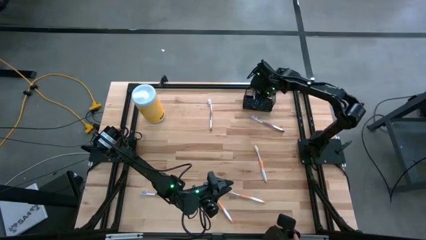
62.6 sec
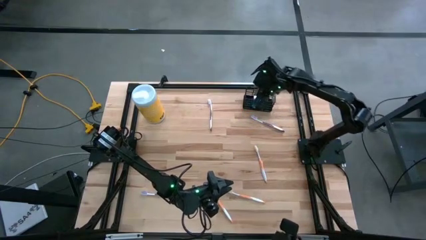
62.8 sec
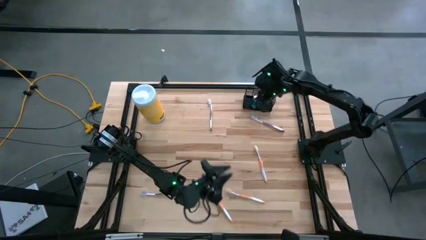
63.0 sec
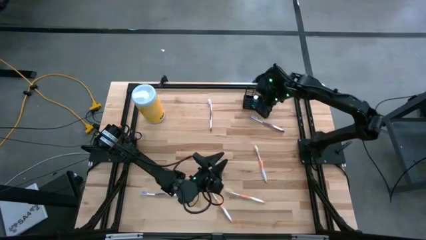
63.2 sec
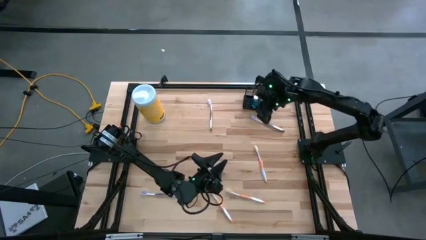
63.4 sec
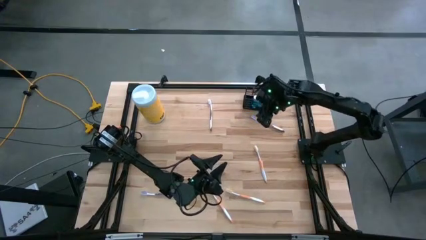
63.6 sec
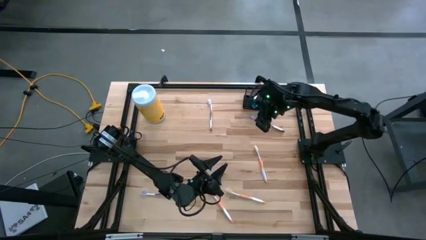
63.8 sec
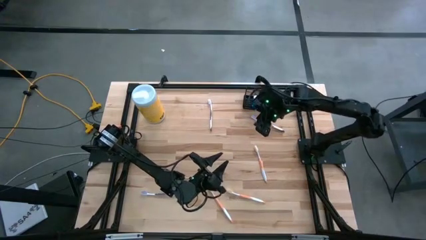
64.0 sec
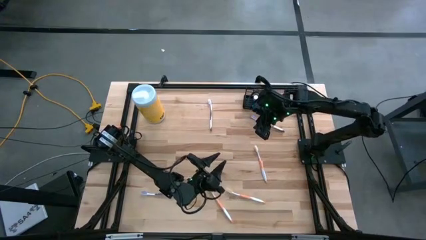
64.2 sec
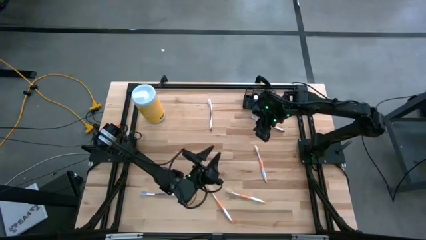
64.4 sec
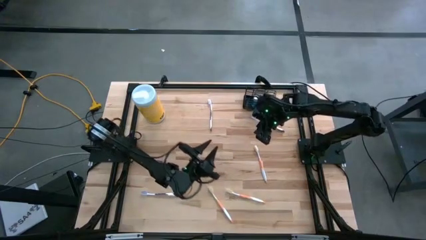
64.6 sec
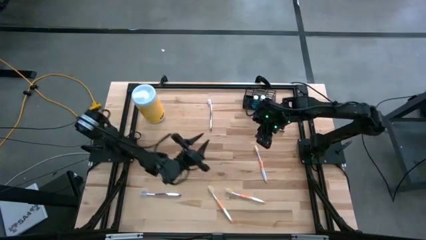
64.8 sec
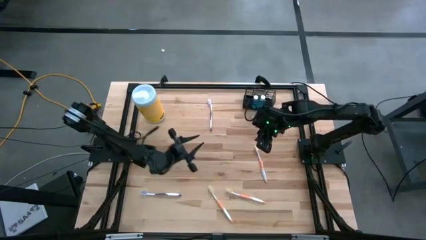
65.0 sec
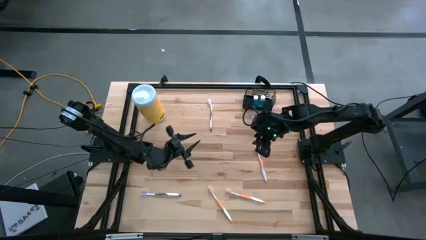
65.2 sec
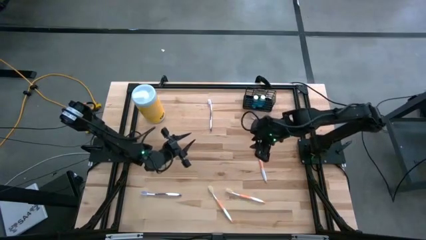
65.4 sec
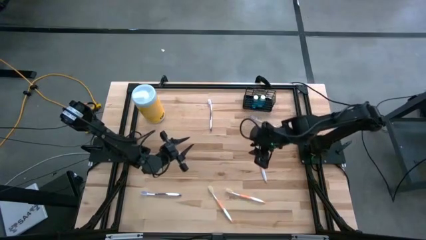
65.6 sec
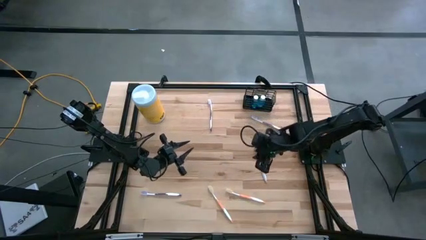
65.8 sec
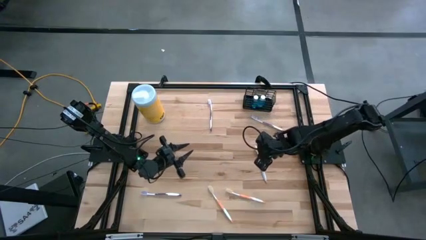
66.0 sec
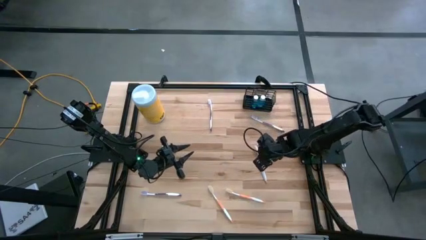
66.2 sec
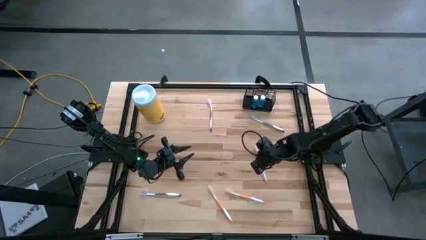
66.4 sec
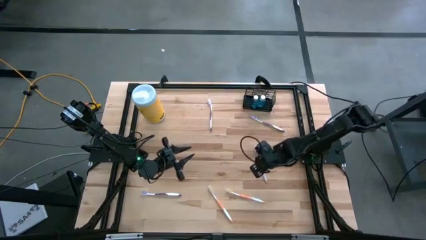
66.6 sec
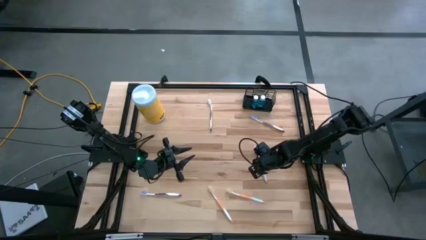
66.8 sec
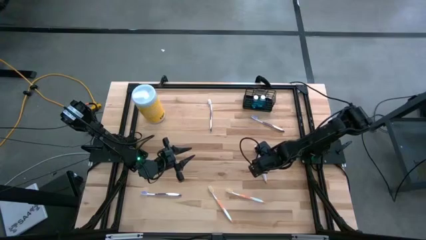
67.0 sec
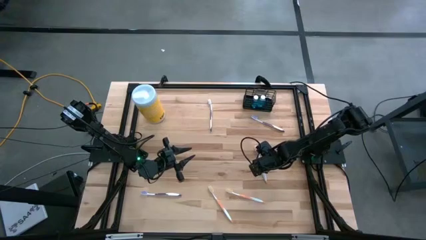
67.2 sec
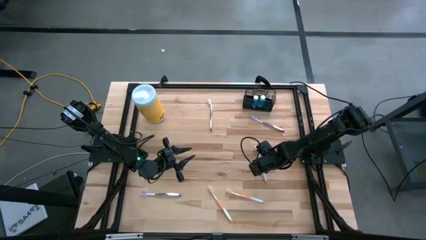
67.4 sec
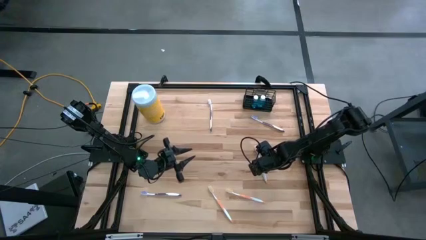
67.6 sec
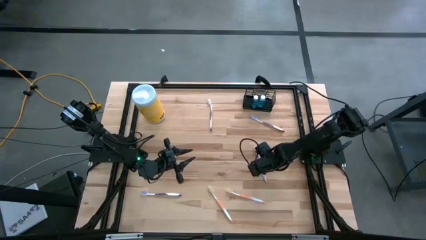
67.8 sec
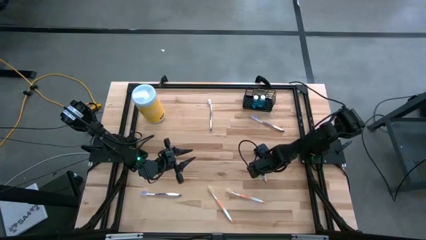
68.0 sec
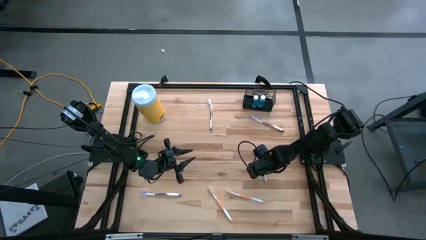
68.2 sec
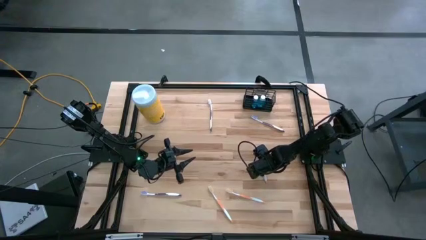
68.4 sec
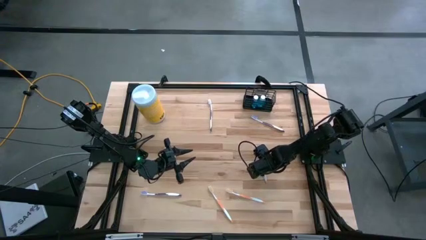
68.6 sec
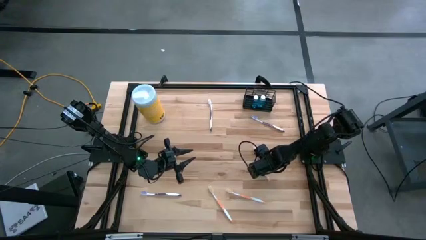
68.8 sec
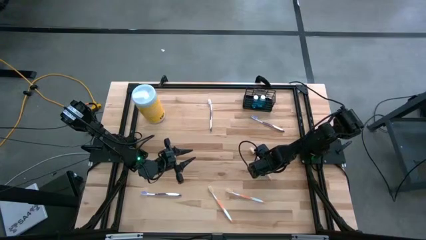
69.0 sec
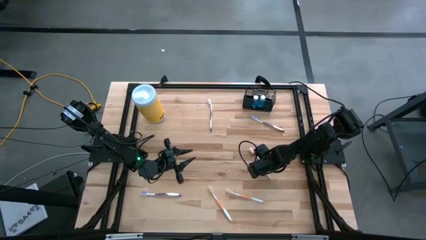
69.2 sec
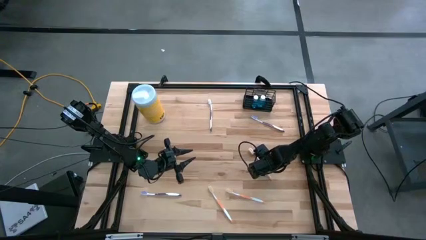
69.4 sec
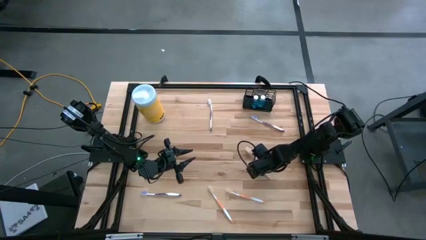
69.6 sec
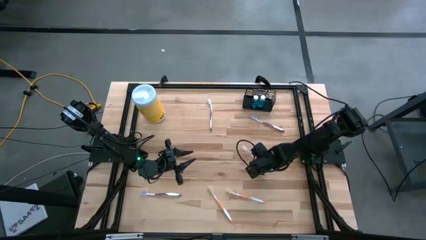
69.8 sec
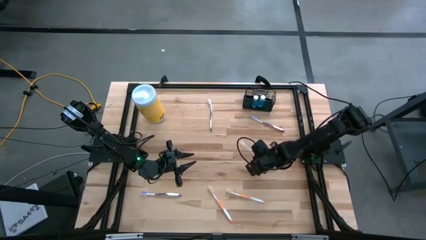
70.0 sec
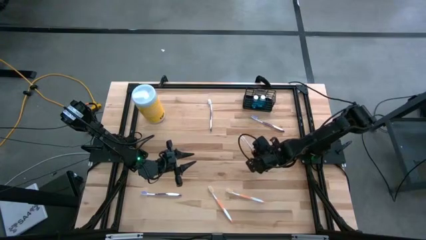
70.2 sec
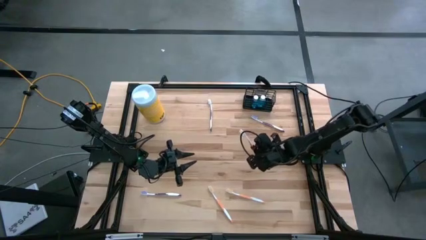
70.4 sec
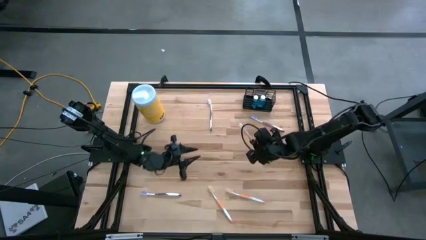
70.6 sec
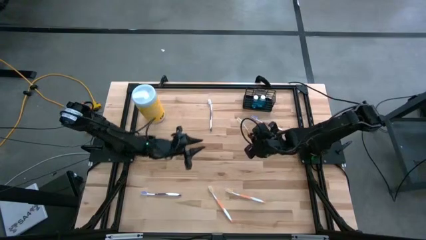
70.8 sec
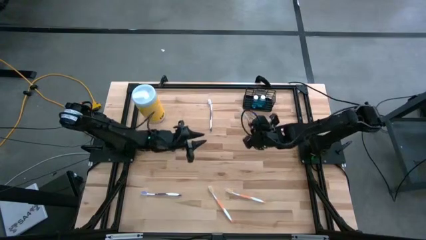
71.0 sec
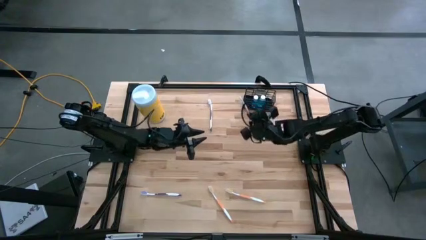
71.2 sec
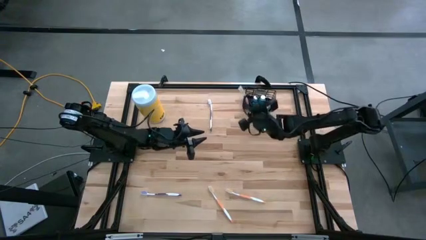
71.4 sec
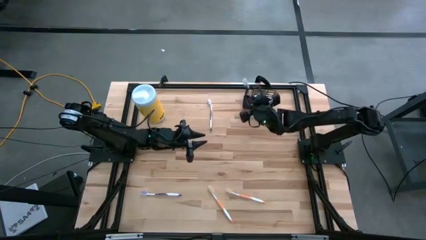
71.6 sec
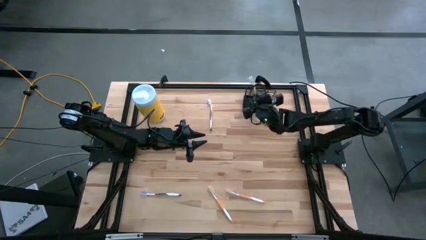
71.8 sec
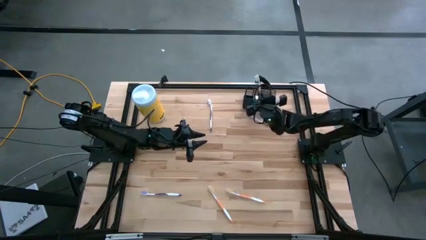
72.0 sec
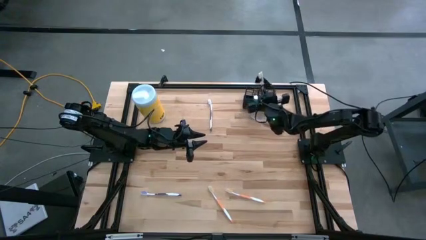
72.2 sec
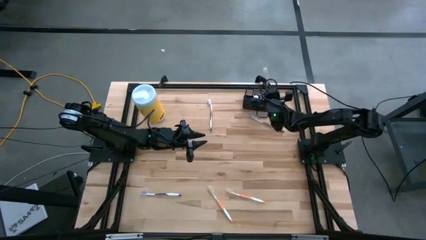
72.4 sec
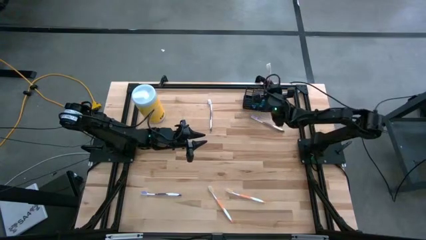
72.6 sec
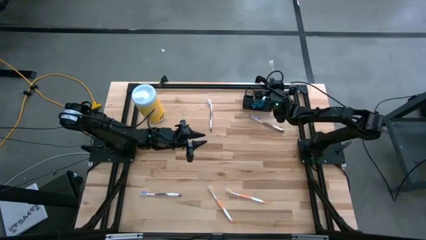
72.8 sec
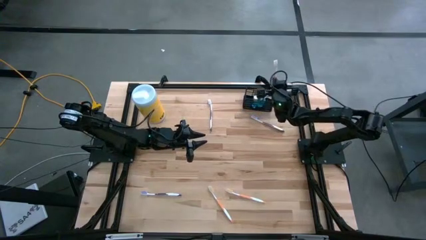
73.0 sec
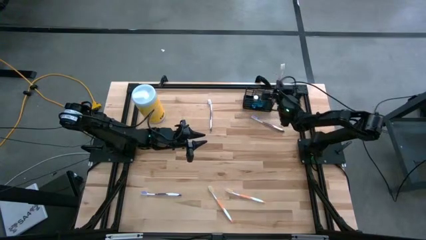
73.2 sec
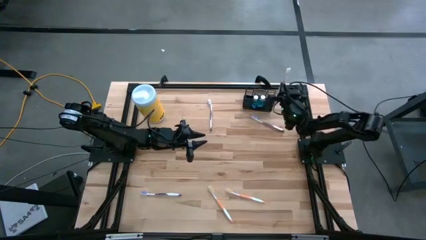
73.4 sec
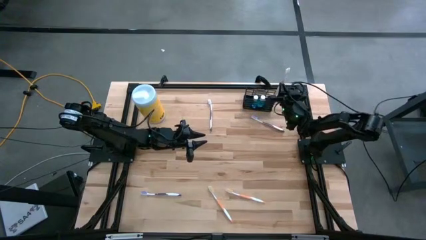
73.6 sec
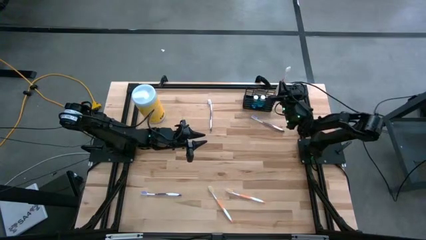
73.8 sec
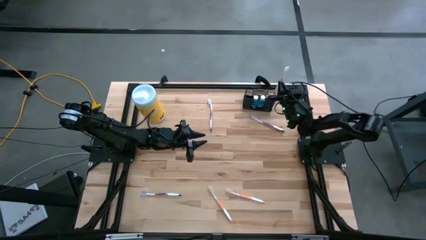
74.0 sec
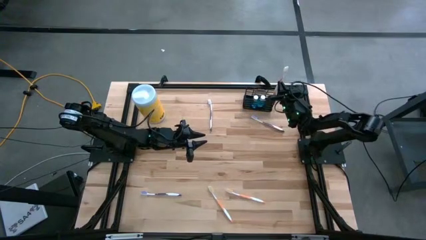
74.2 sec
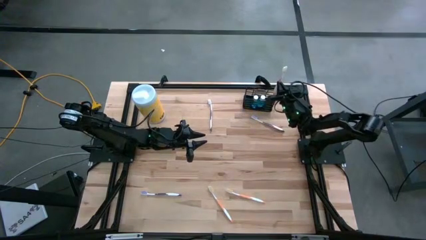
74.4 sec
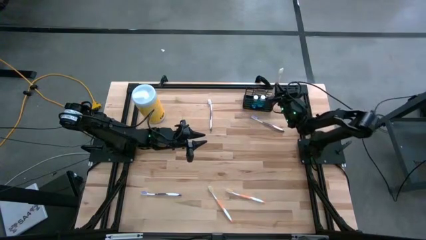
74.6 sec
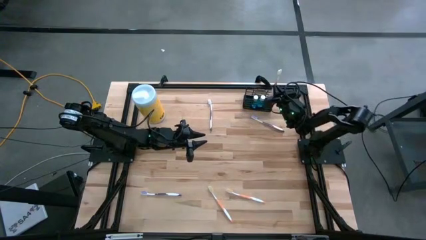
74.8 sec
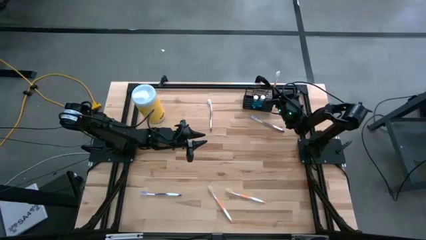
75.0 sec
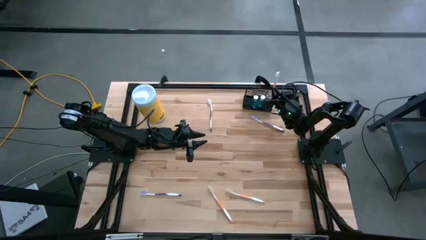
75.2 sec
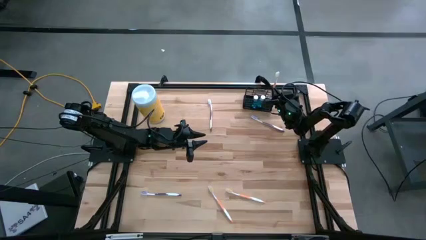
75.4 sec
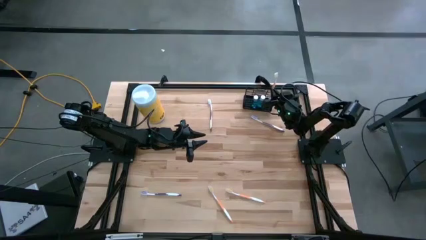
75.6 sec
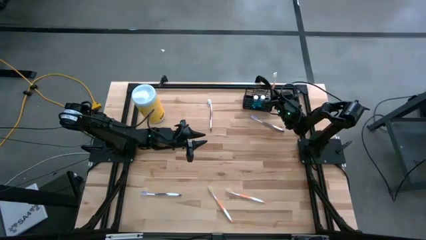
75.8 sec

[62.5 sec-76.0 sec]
Task: Pick & Place toothbrushing station
Put the top orange toothbrush into the black wire organizer
